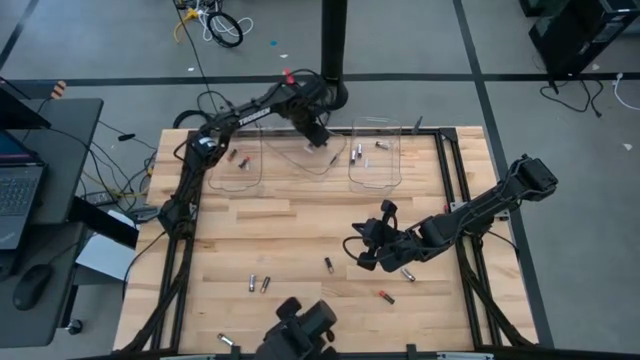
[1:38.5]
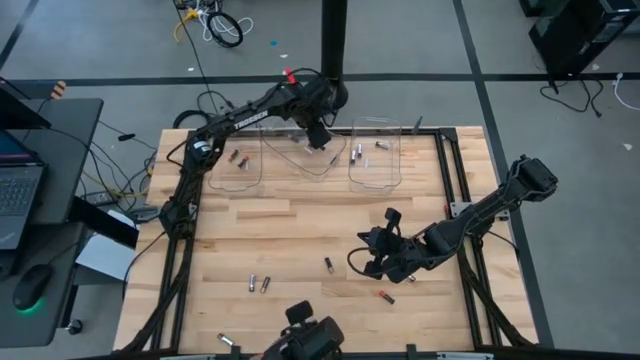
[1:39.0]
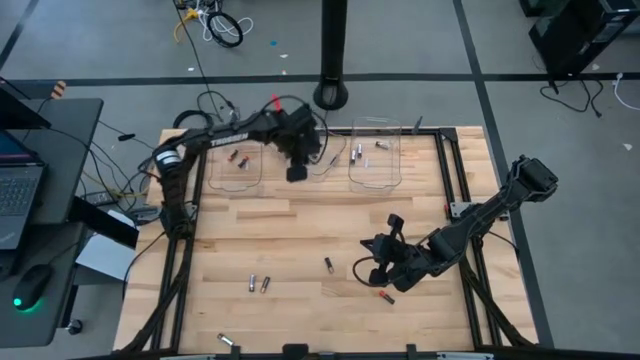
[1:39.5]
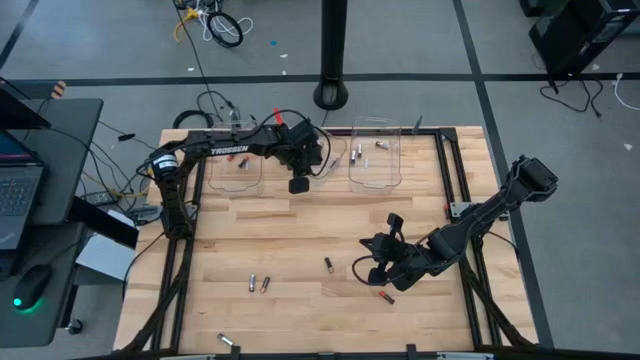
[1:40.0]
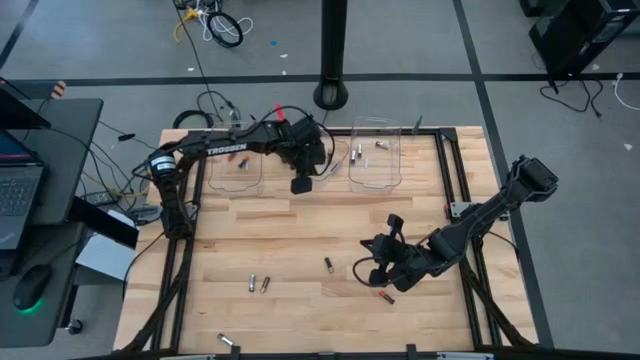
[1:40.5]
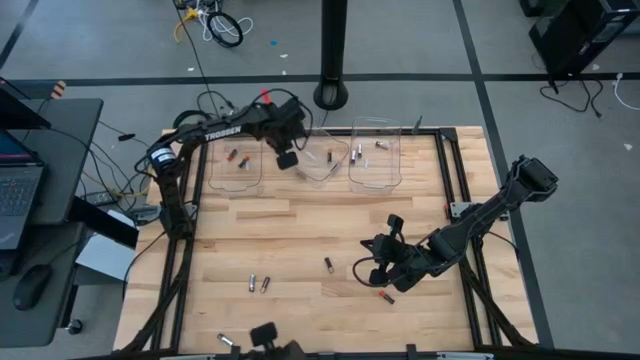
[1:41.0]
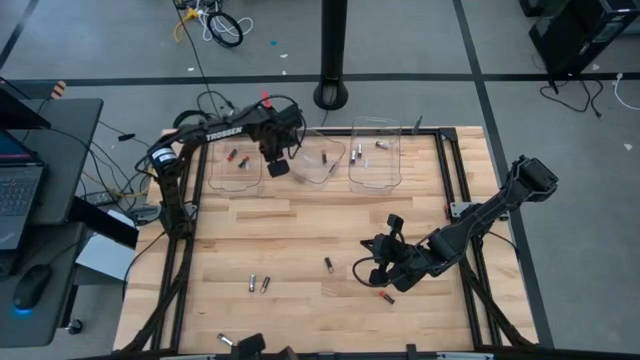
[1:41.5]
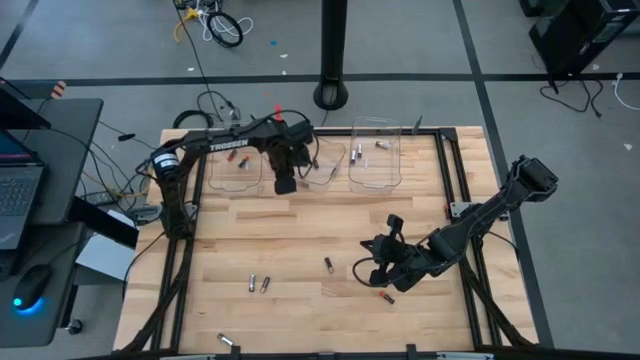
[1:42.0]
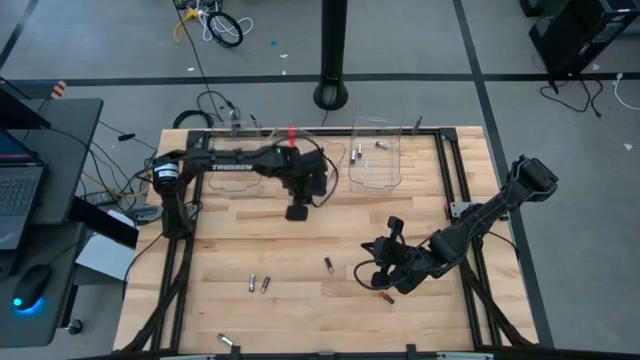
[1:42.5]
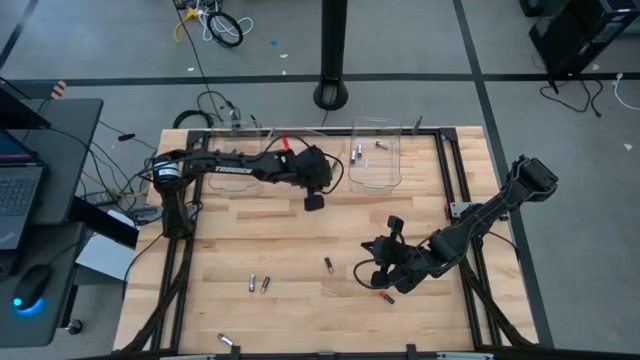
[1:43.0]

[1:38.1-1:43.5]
Task: Sort batteries
Adjust the middle transparent bin

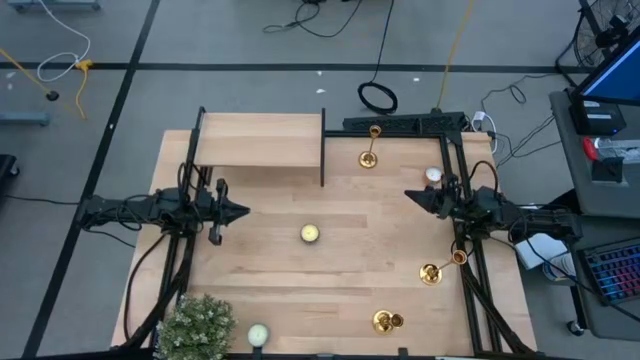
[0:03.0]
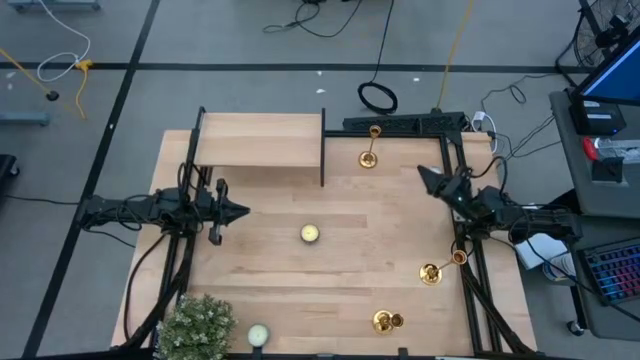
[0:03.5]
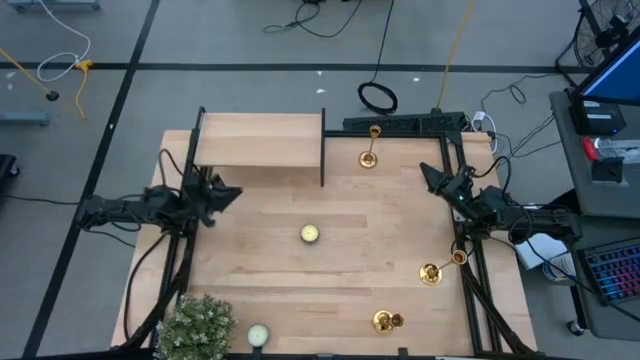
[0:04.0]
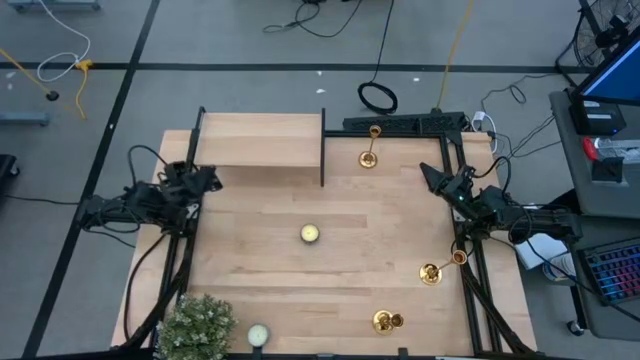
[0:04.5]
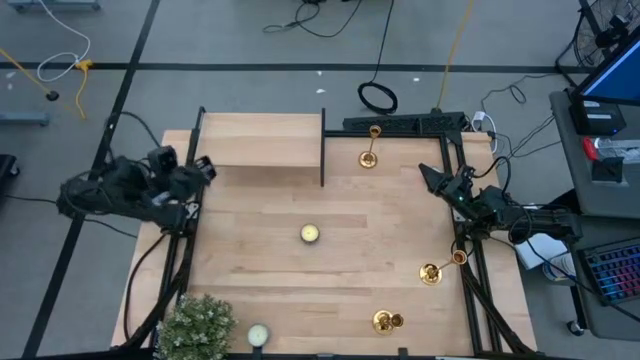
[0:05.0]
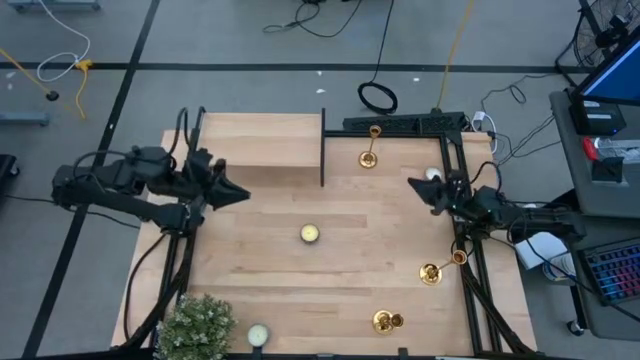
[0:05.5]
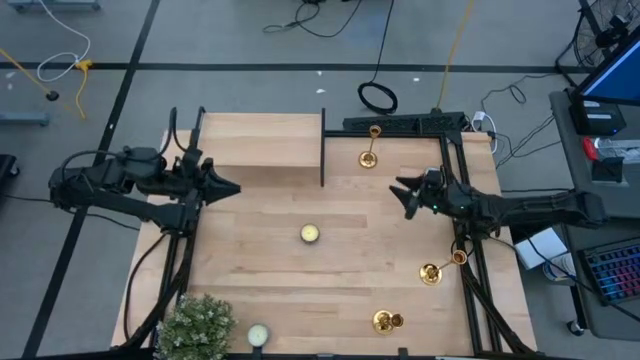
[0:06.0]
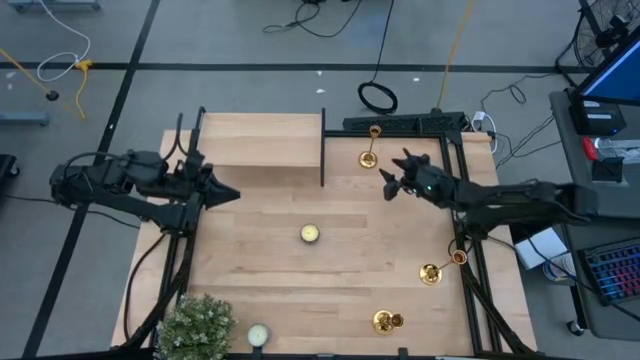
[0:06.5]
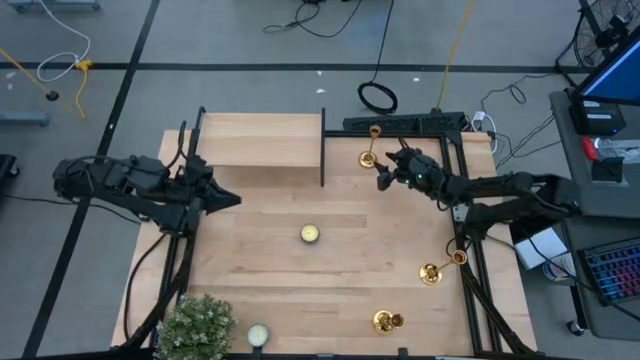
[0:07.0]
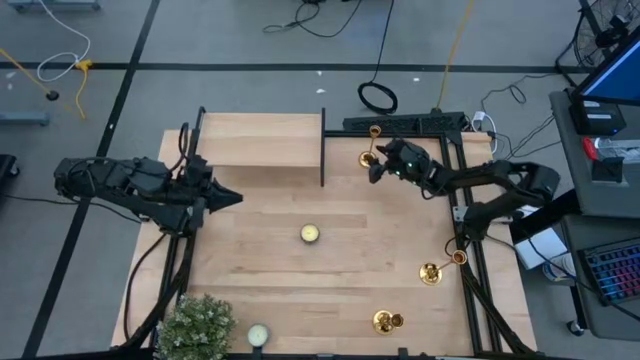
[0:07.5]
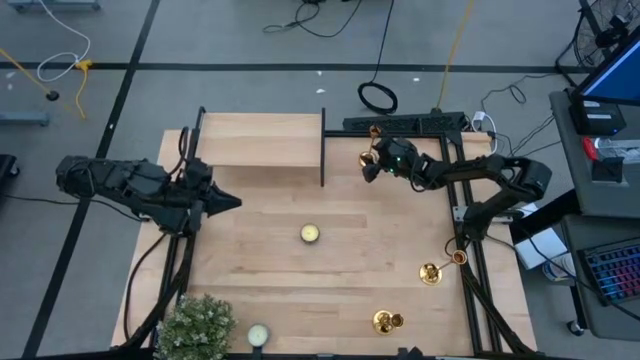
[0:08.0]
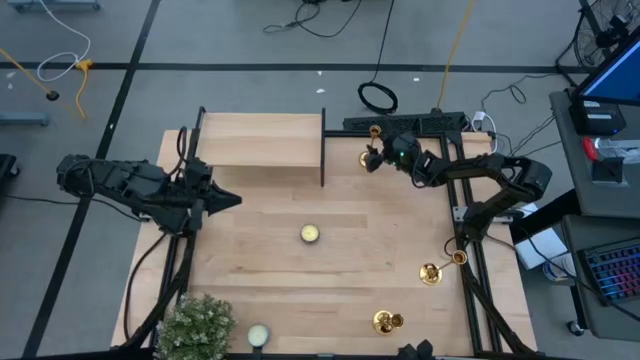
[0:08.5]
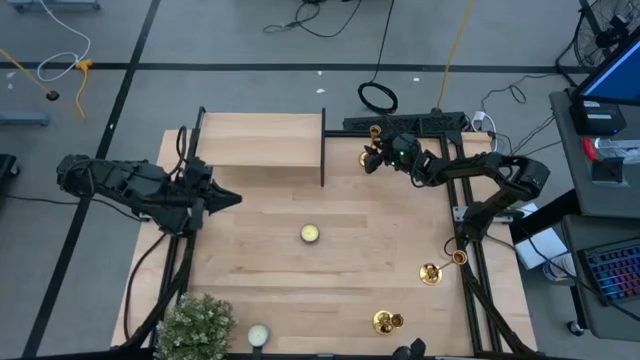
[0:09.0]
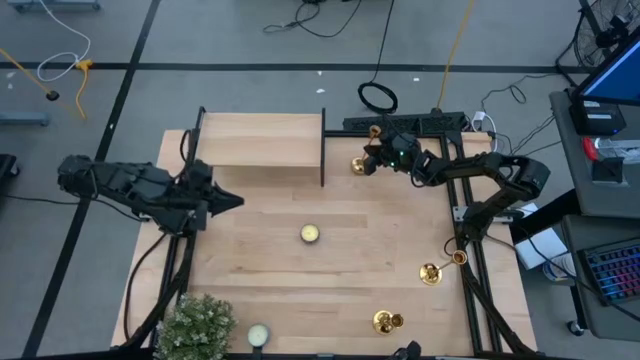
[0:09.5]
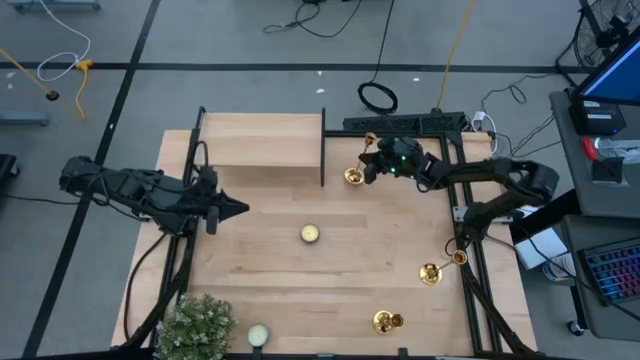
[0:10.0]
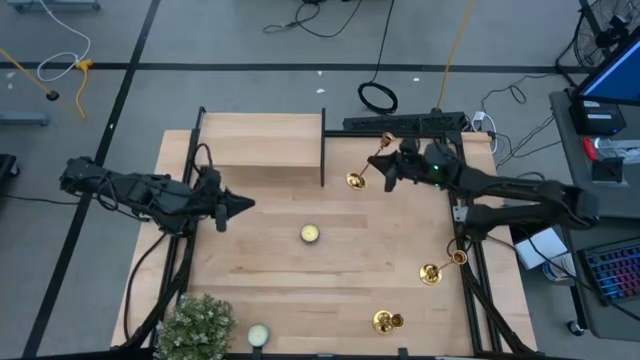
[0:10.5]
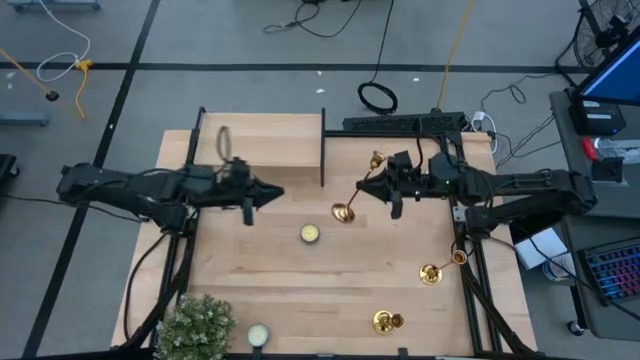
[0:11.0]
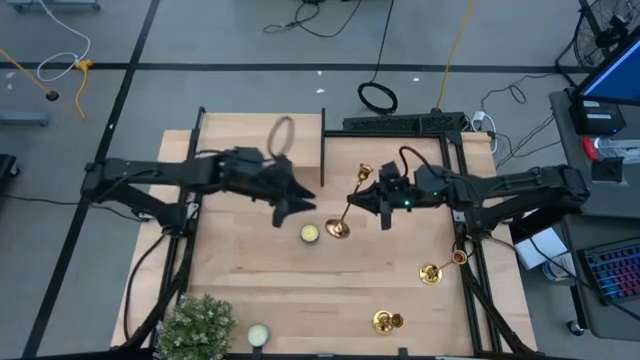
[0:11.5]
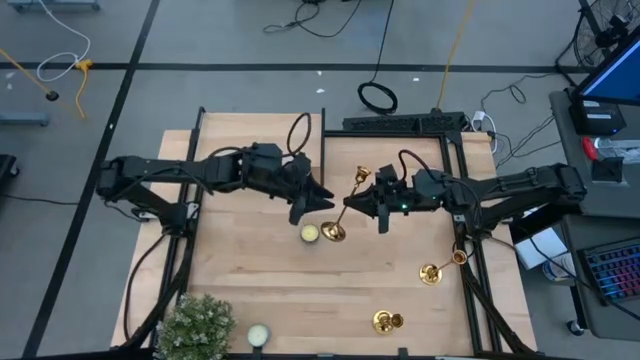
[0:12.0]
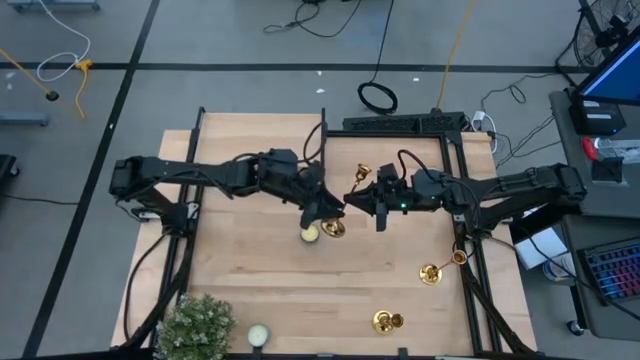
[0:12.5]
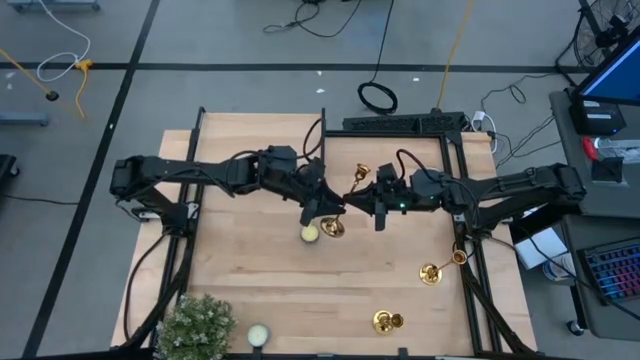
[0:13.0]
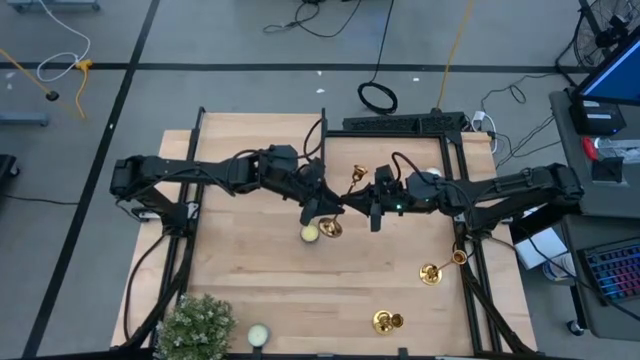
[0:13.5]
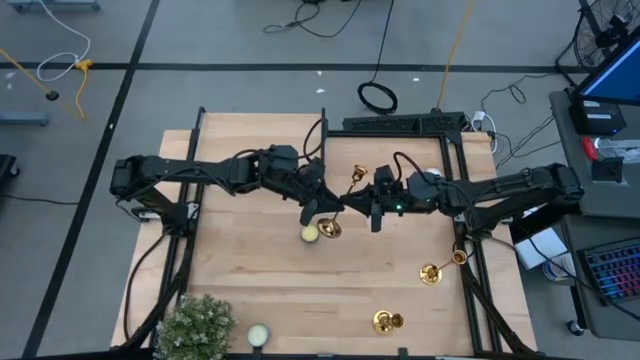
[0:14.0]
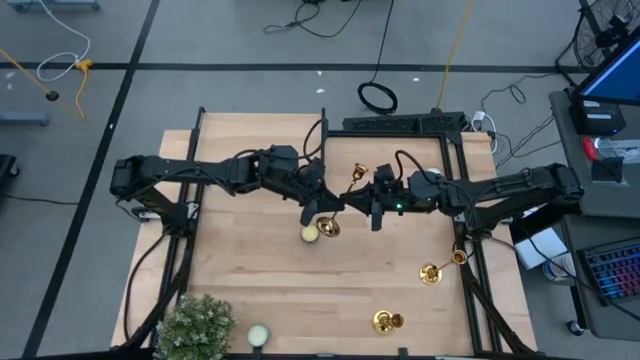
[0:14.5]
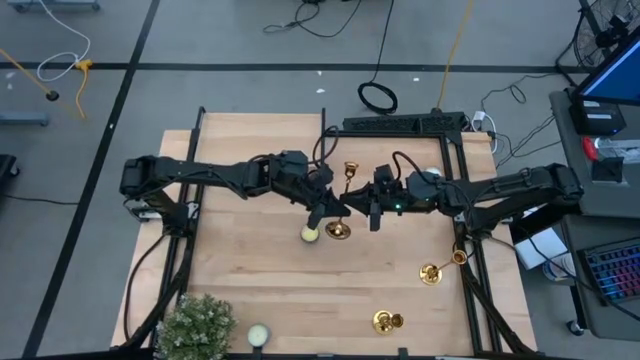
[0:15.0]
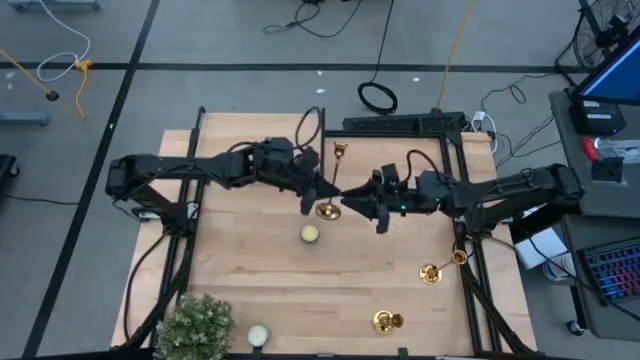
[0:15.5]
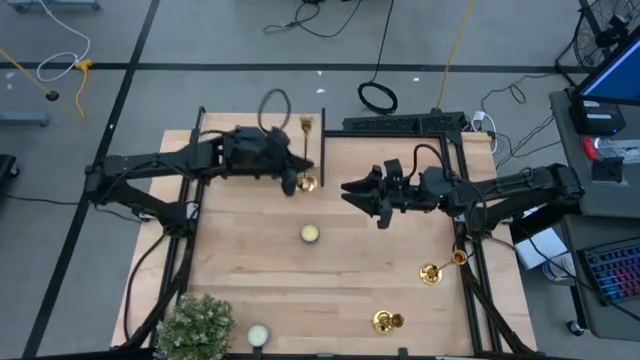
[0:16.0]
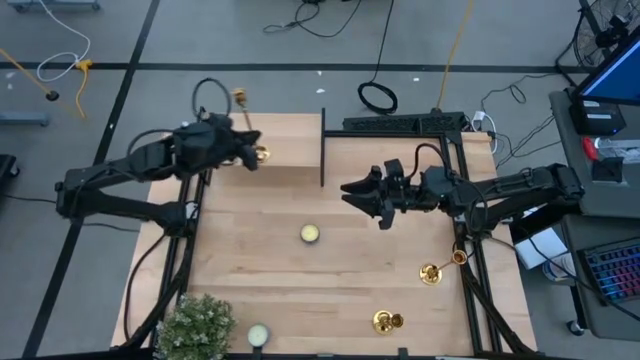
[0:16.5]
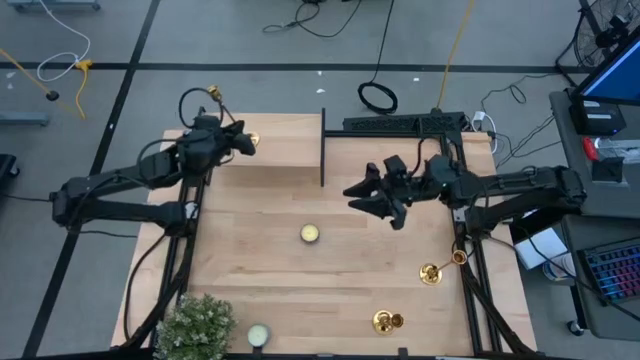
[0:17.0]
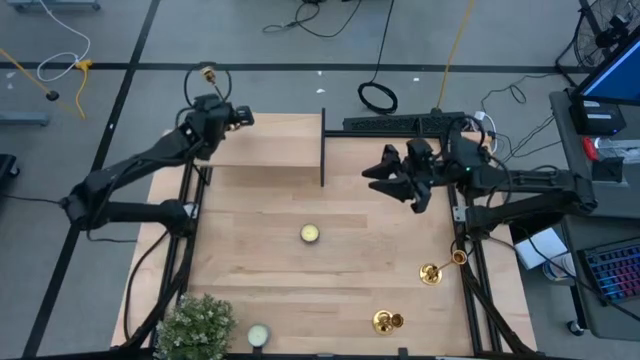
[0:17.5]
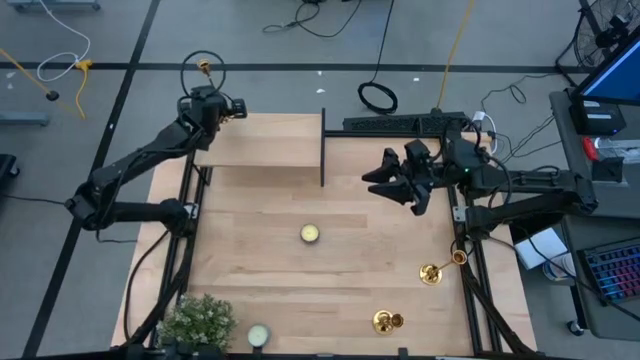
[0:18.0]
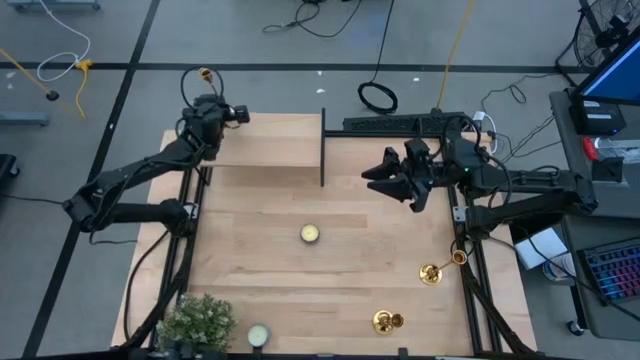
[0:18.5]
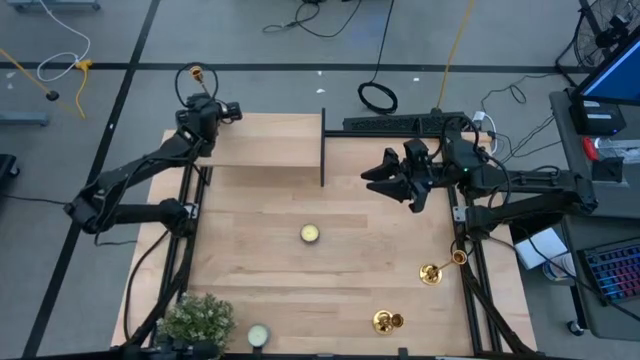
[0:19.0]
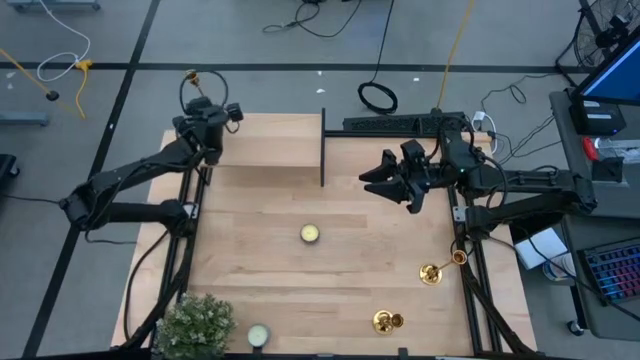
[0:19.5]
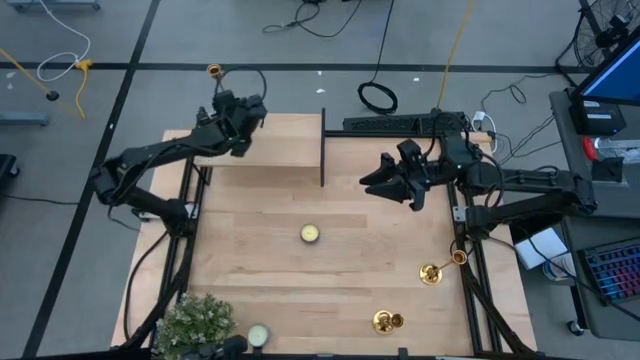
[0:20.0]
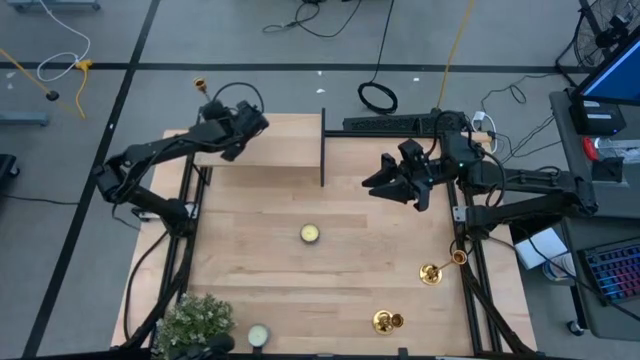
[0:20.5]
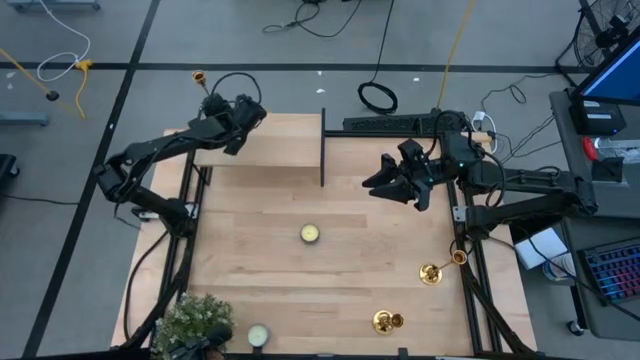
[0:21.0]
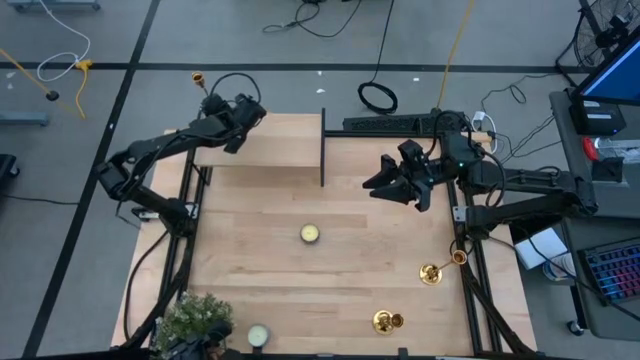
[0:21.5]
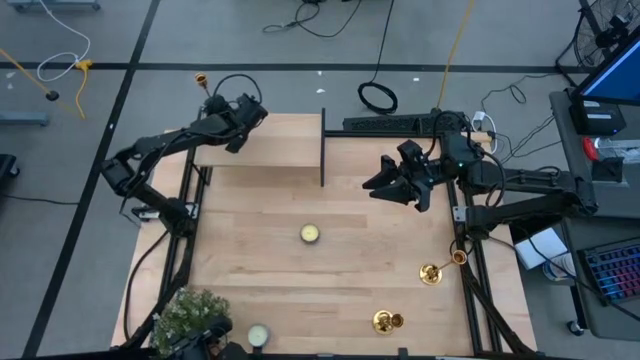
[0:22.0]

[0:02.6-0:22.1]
Task: Pick & Place candle stick holders
Put the top gold candle holder on the shelf
